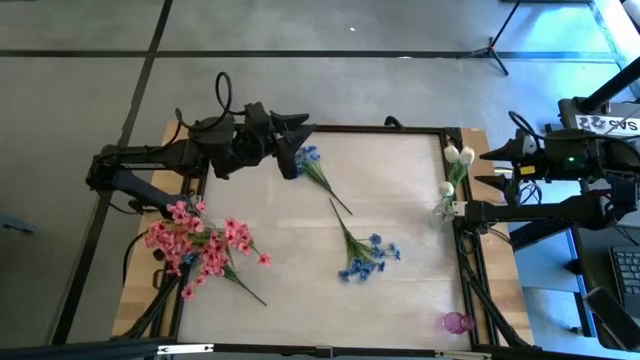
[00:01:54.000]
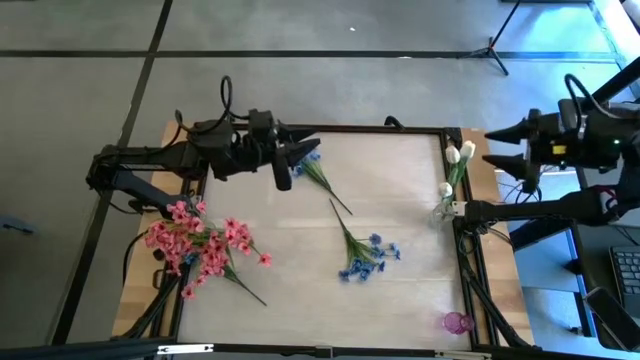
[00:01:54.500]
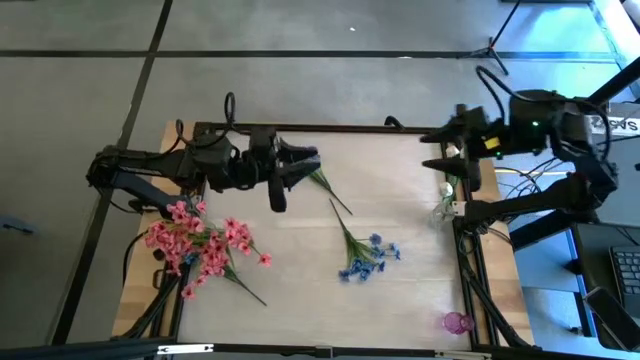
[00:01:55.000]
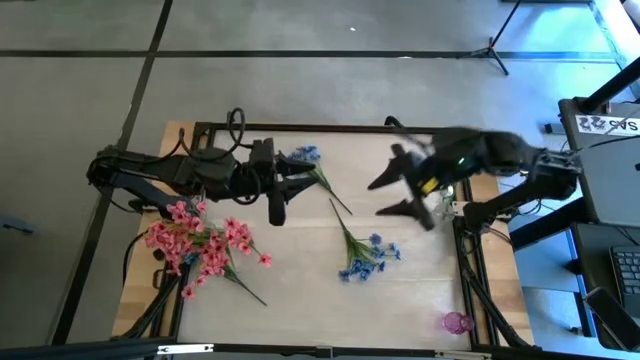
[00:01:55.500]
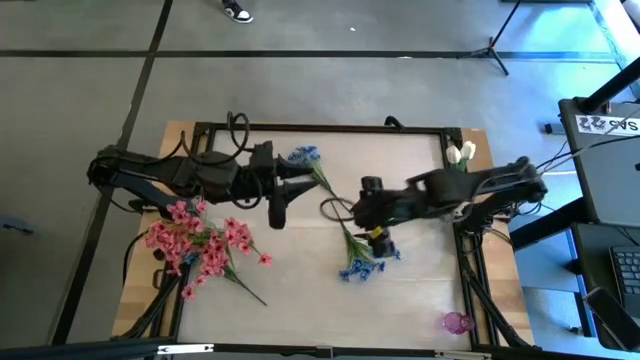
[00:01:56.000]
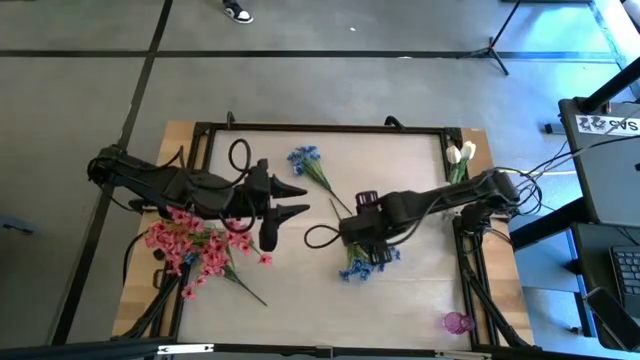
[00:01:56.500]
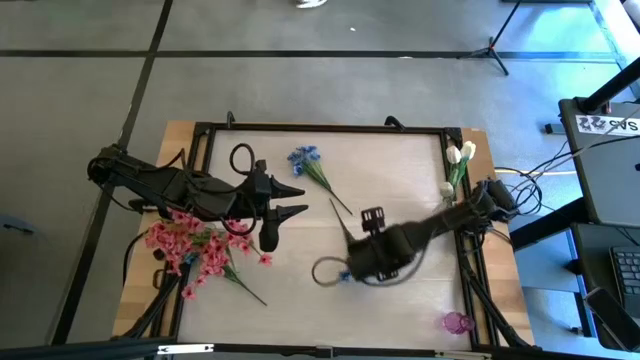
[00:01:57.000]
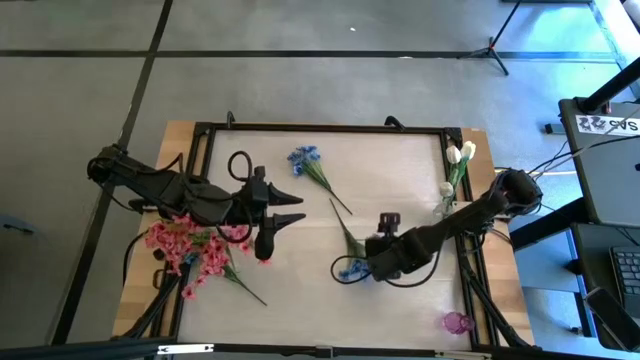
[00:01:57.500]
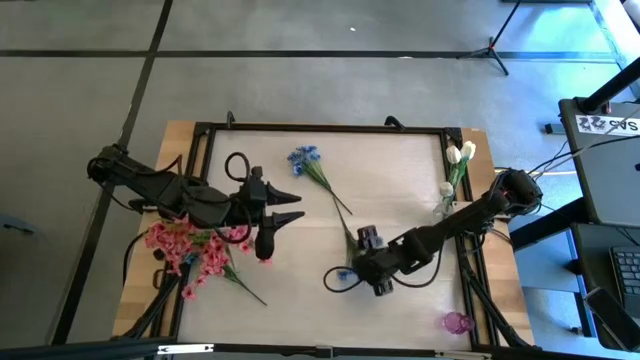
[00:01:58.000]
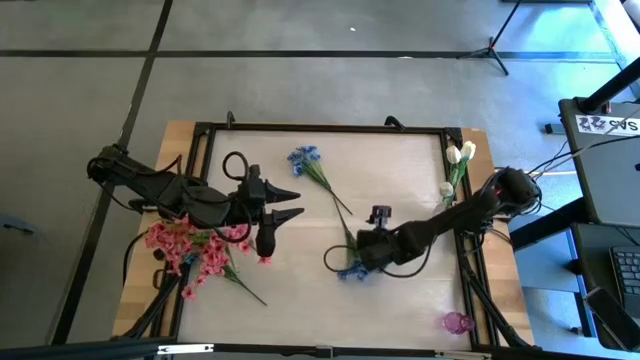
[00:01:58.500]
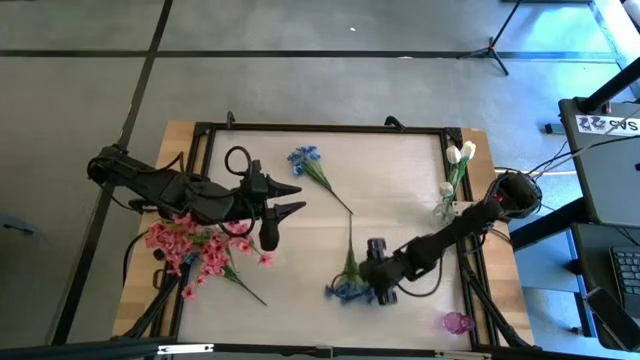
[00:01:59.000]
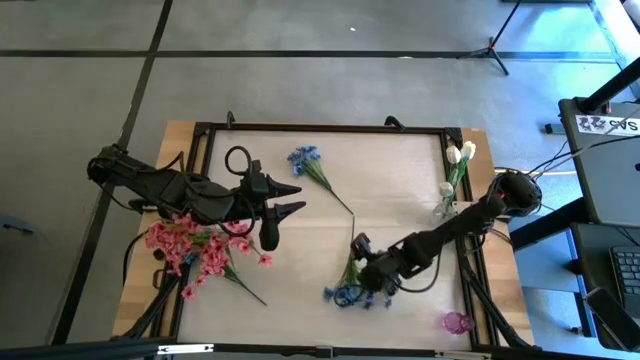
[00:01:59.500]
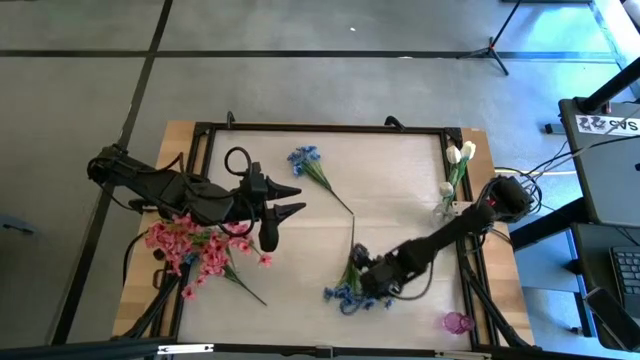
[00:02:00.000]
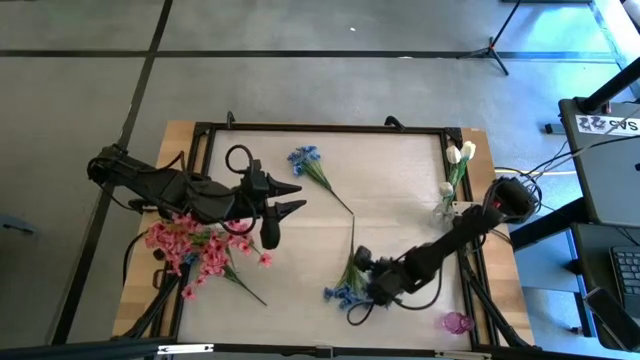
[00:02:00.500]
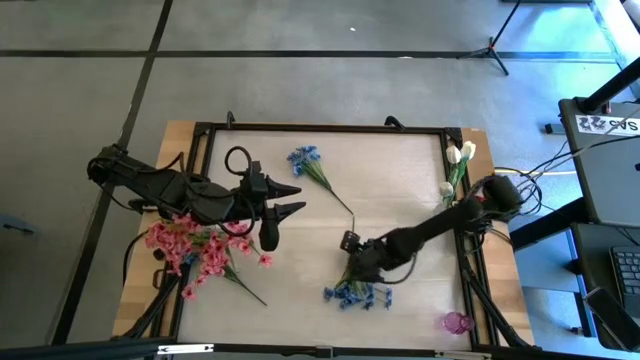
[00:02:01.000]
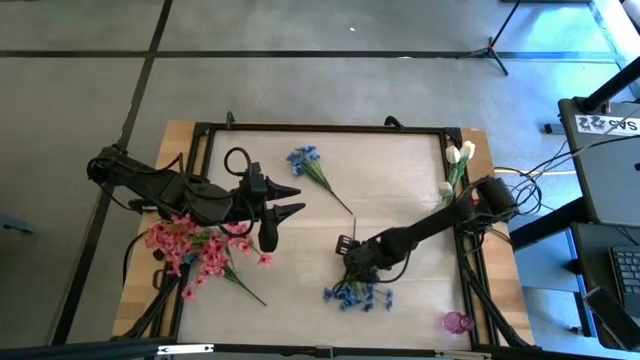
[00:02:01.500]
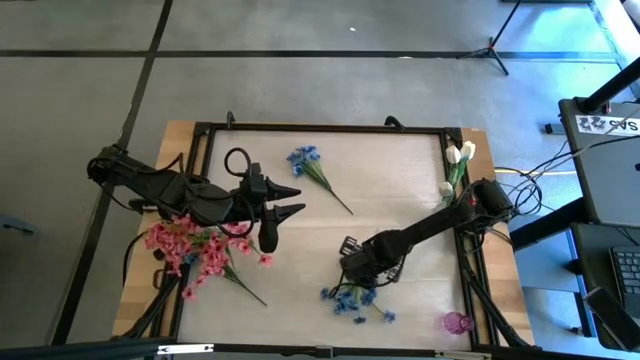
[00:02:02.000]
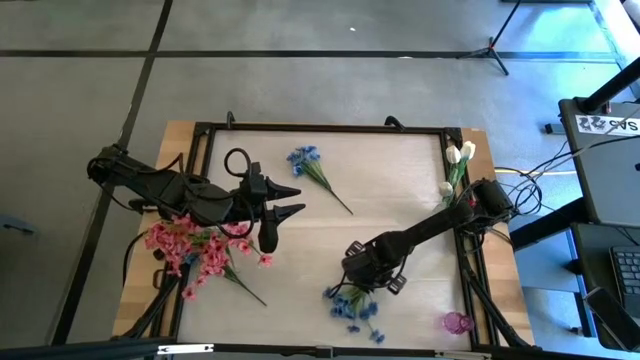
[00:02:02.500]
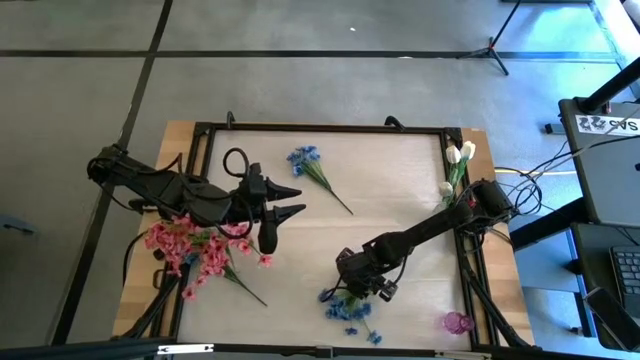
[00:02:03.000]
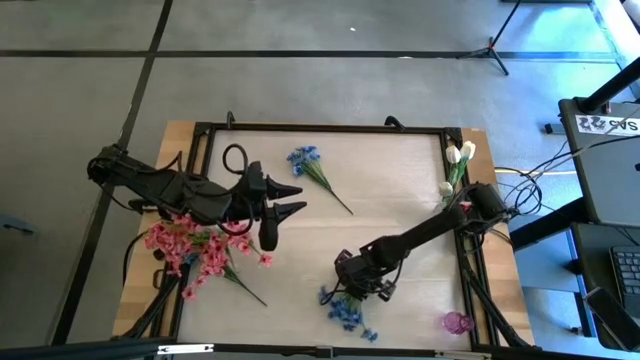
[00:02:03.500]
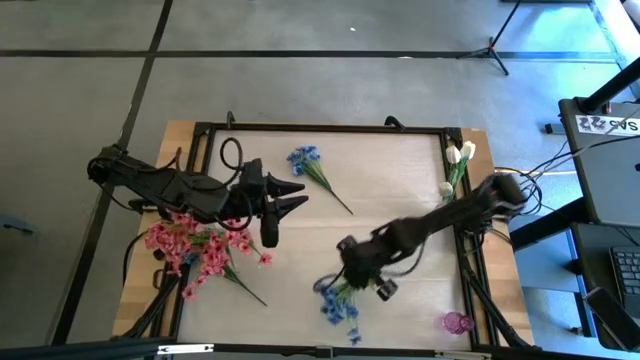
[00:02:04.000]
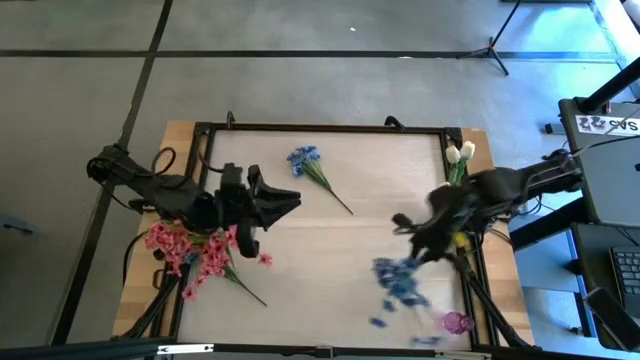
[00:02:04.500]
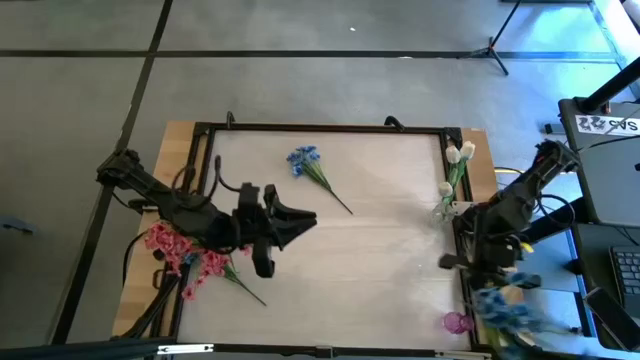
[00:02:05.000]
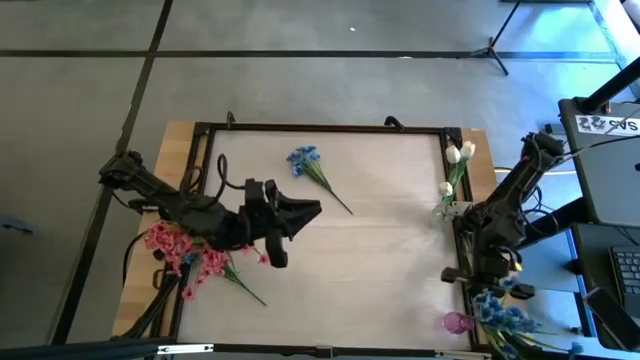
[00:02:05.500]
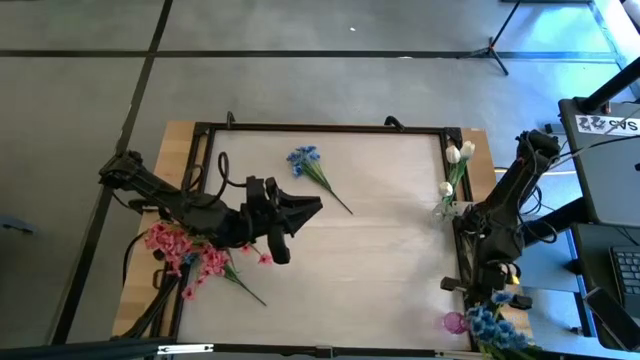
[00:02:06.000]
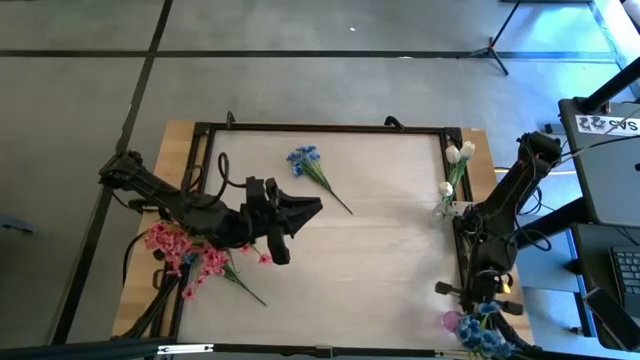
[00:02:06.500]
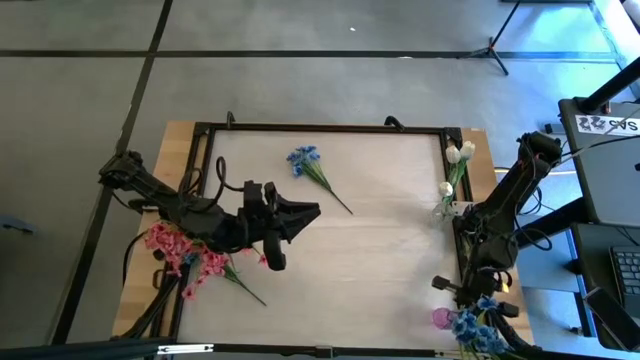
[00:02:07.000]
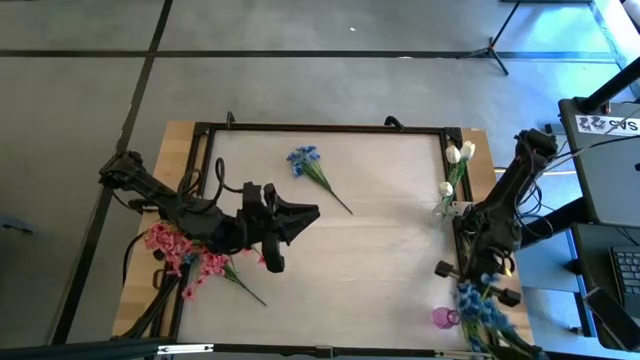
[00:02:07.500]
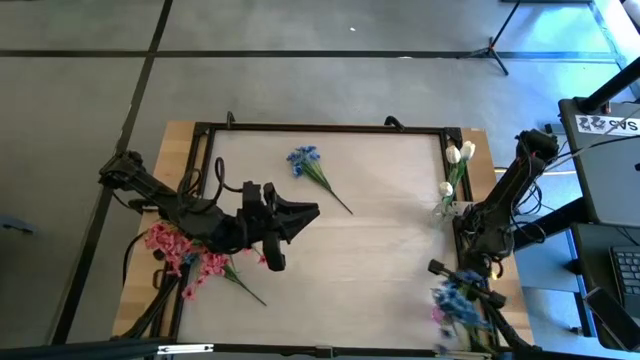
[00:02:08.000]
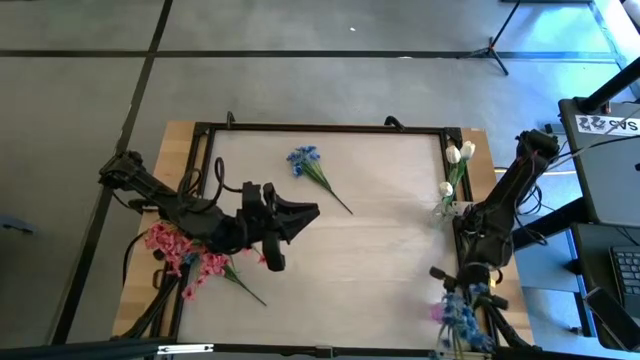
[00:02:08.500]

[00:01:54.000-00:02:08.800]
Task: Sort flowers into vase by color
Put the bottom right blue flowers into the violet vase

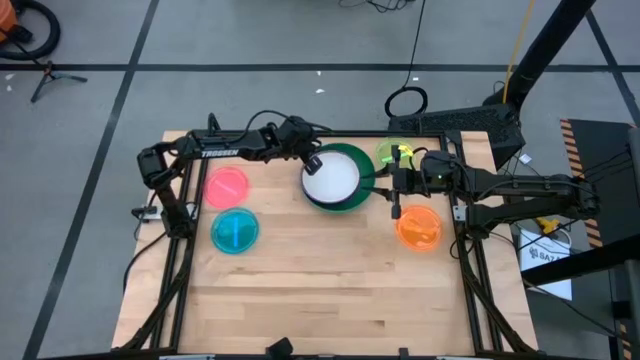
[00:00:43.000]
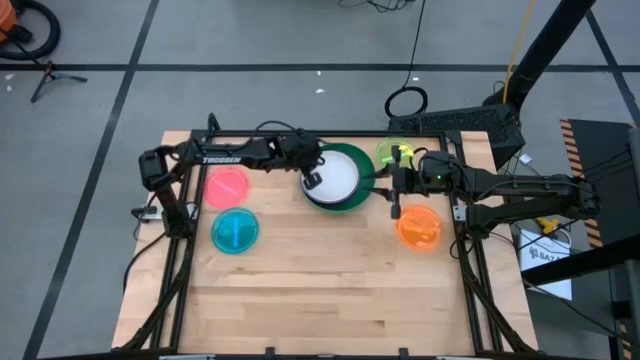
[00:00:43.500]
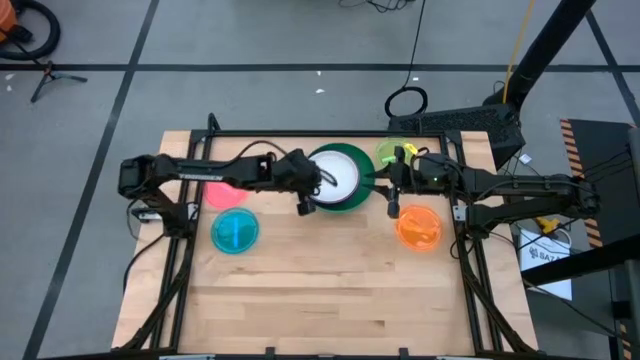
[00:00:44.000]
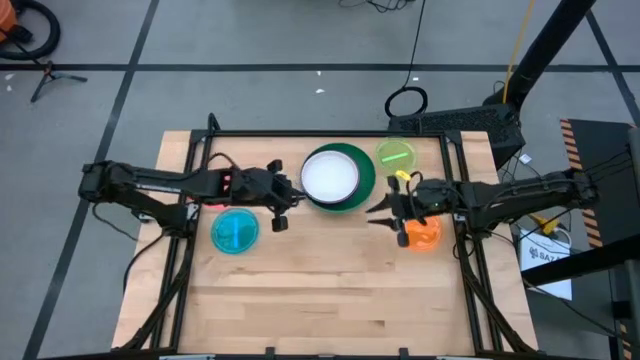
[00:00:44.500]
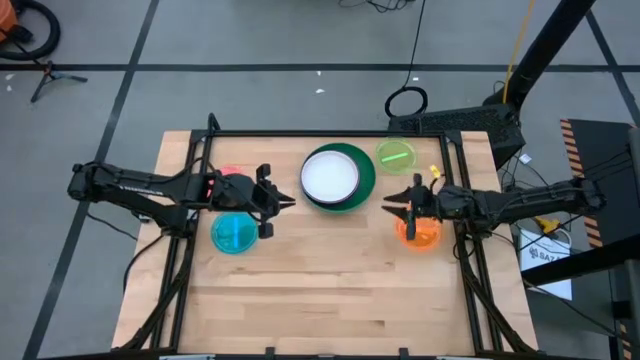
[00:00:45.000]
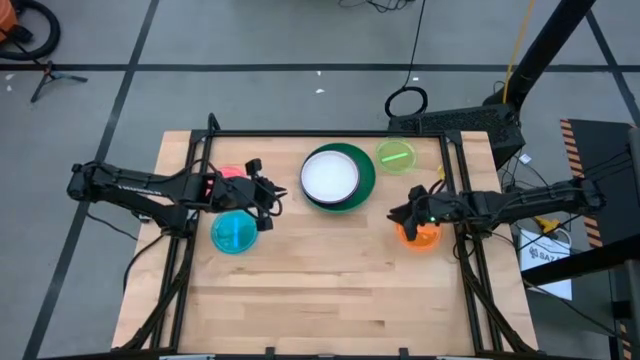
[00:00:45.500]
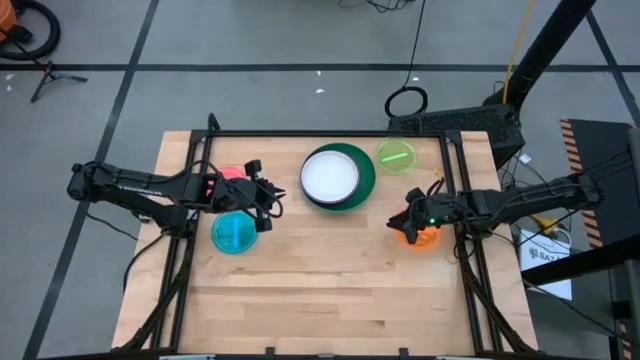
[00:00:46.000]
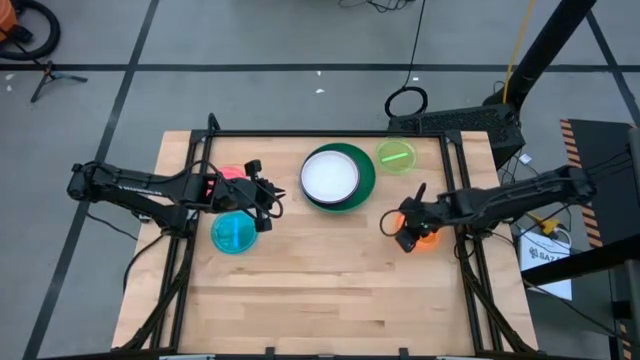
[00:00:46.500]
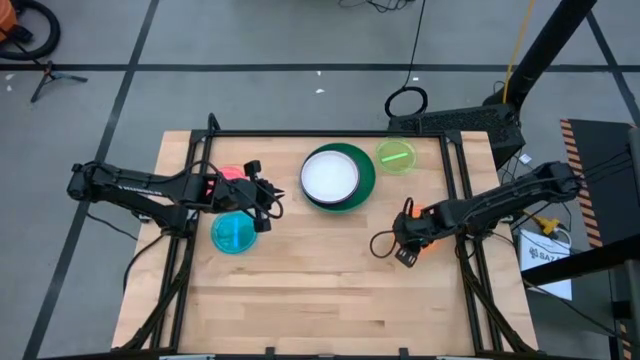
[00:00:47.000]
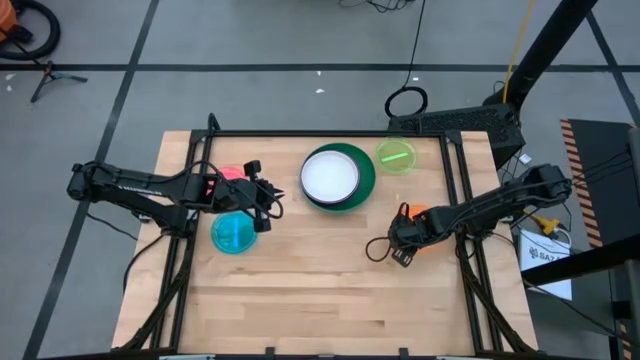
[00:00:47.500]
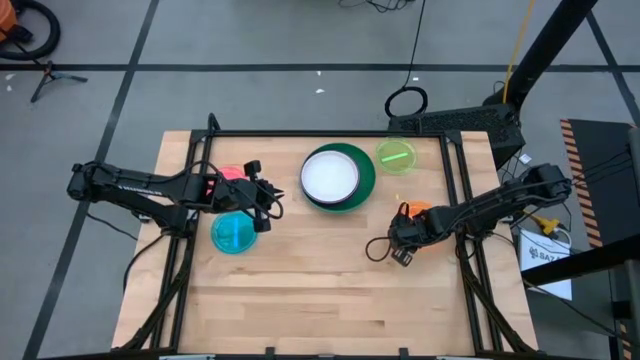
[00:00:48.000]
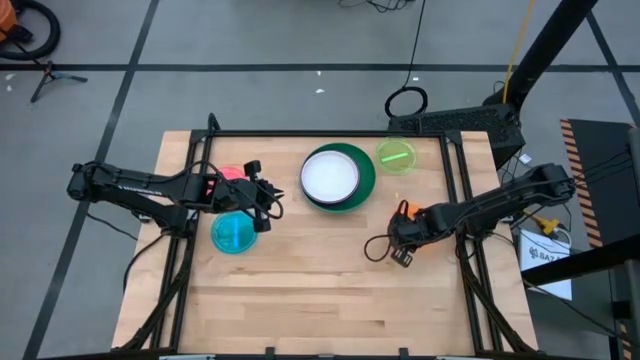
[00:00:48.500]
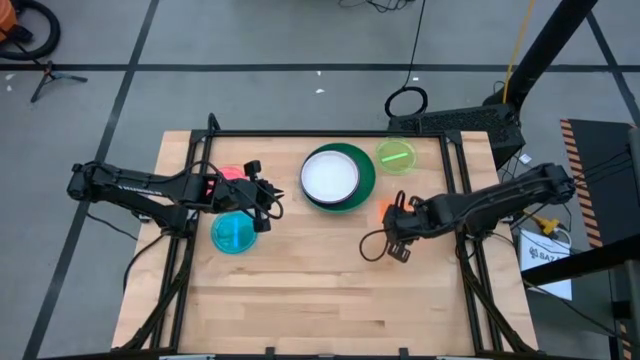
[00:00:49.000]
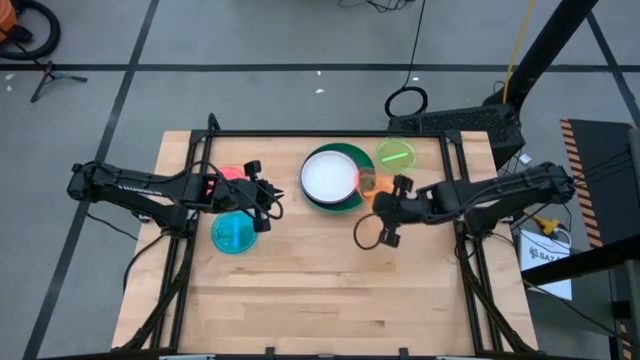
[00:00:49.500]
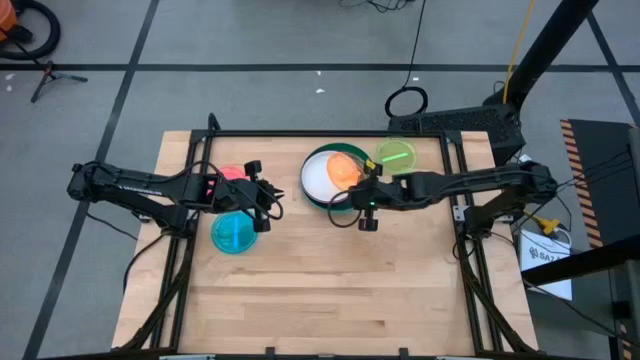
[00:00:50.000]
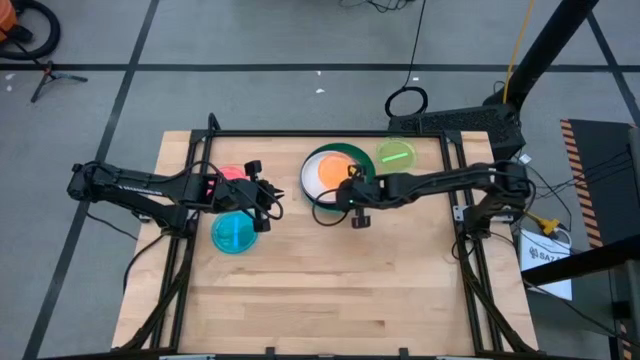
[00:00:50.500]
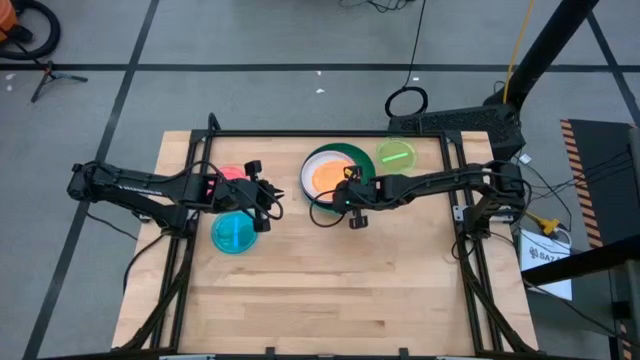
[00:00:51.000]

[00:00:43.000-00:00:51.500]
Task: Stack plastic plates
Stack the orange plate on top of the white plate
